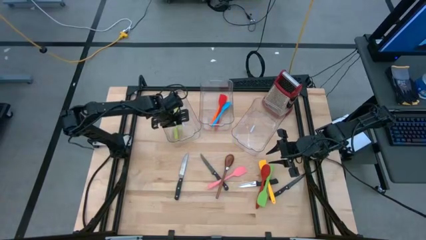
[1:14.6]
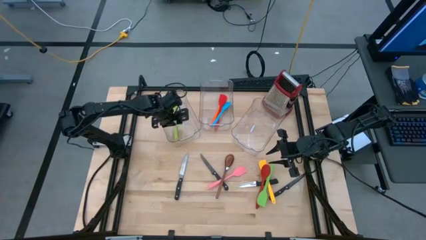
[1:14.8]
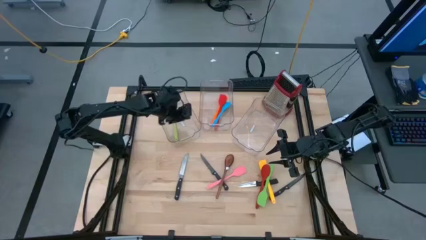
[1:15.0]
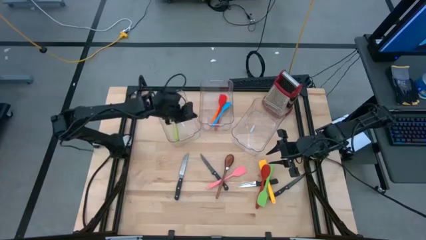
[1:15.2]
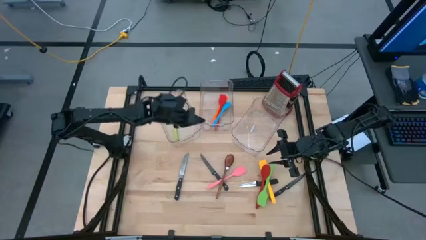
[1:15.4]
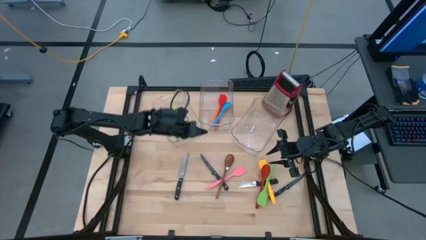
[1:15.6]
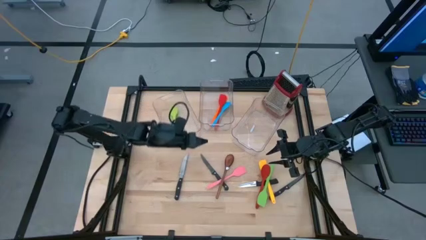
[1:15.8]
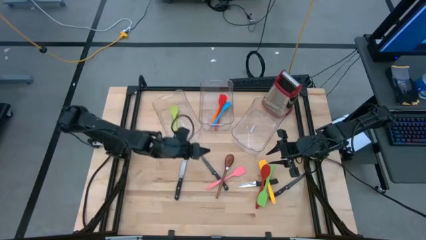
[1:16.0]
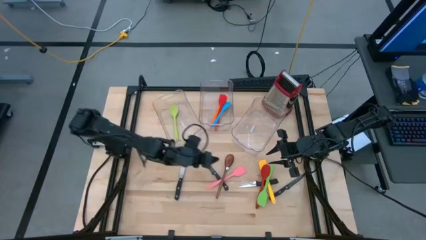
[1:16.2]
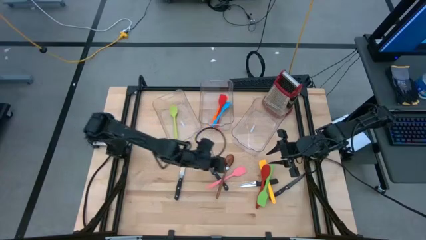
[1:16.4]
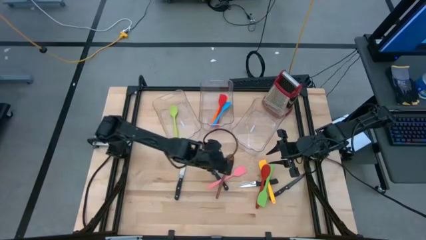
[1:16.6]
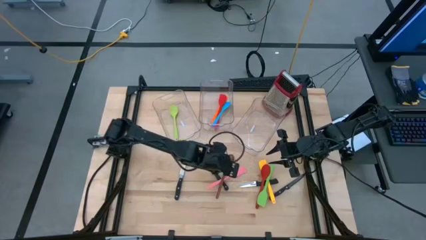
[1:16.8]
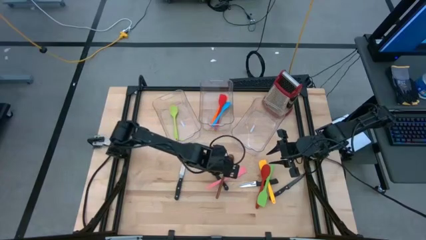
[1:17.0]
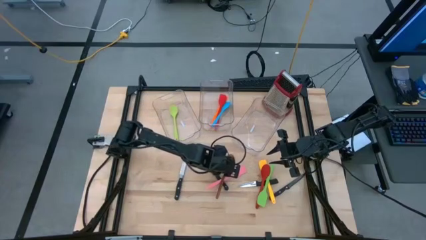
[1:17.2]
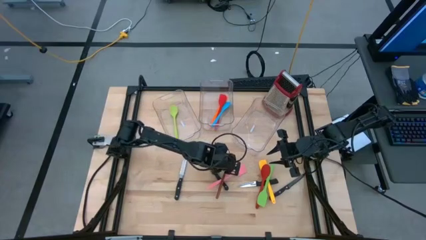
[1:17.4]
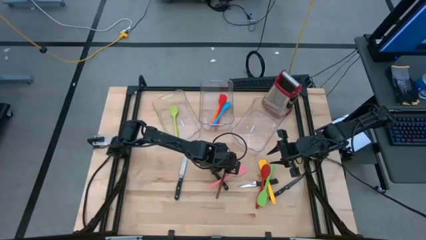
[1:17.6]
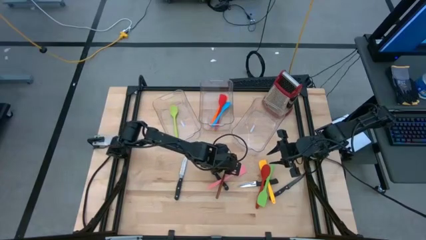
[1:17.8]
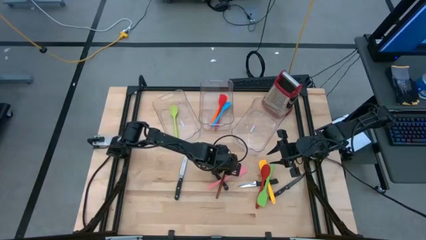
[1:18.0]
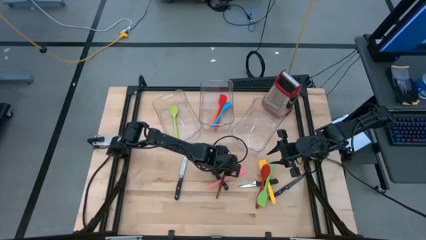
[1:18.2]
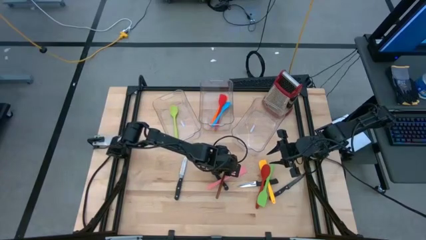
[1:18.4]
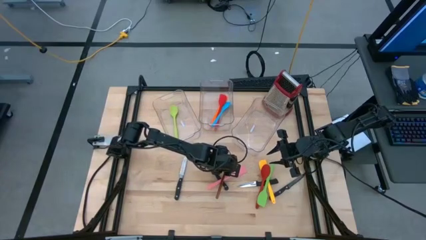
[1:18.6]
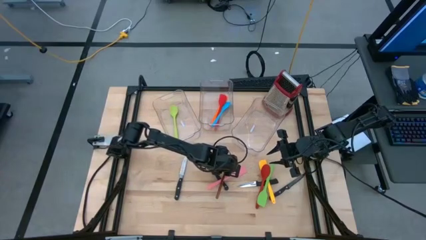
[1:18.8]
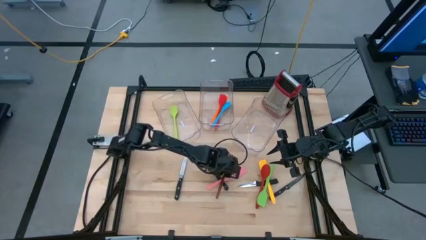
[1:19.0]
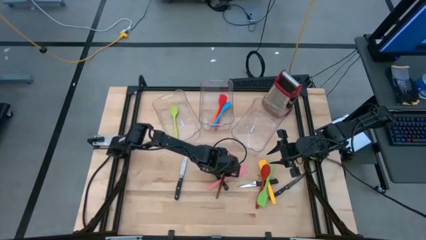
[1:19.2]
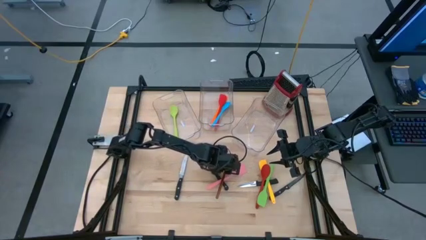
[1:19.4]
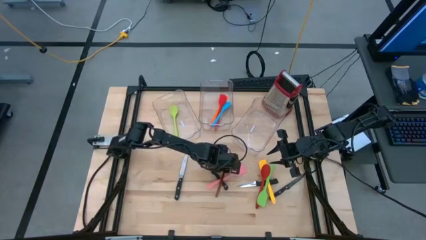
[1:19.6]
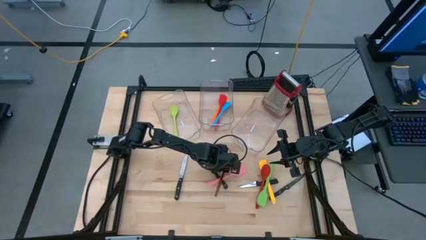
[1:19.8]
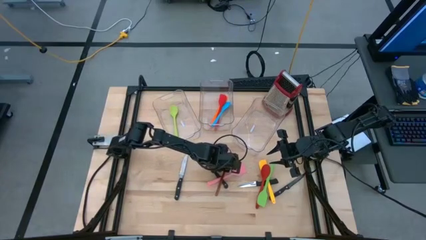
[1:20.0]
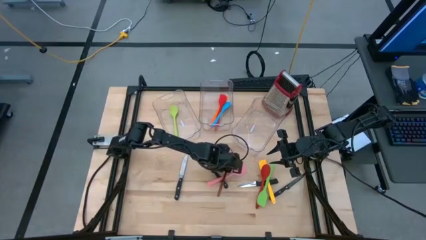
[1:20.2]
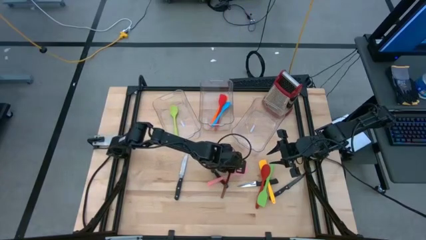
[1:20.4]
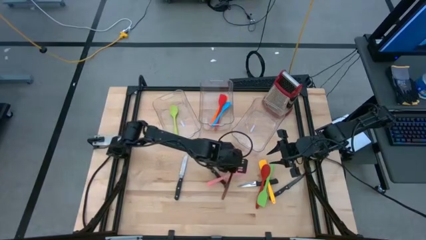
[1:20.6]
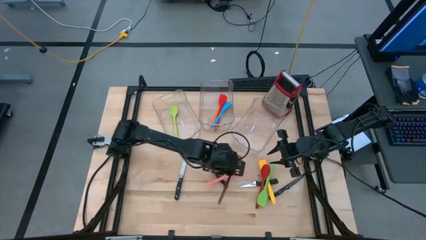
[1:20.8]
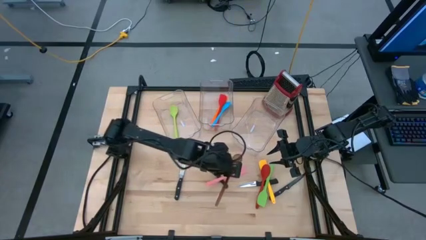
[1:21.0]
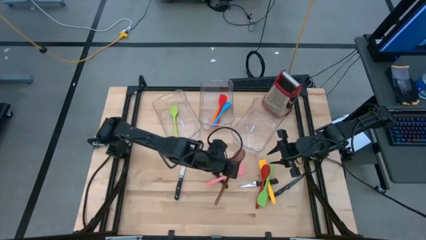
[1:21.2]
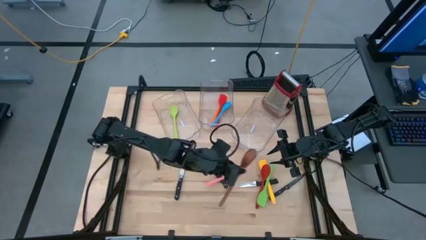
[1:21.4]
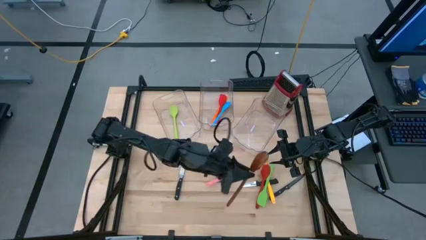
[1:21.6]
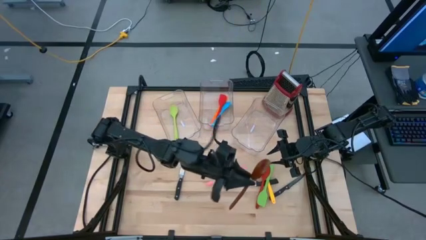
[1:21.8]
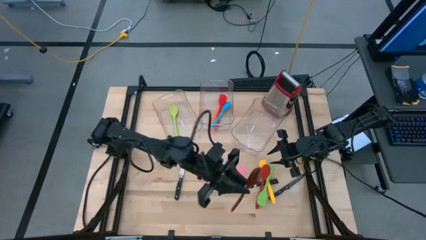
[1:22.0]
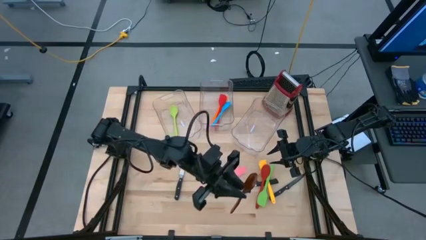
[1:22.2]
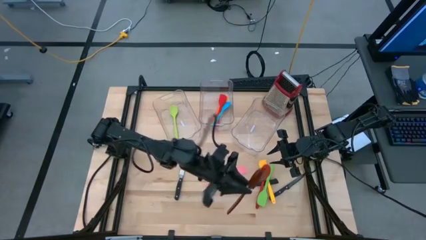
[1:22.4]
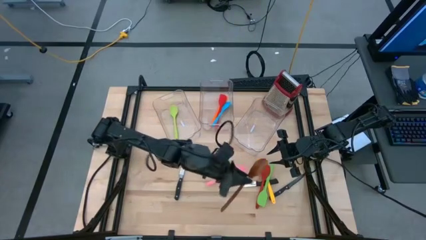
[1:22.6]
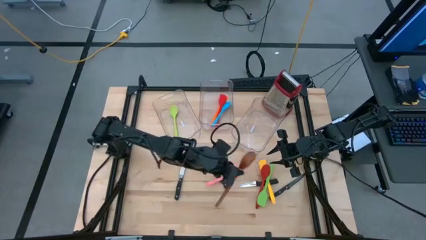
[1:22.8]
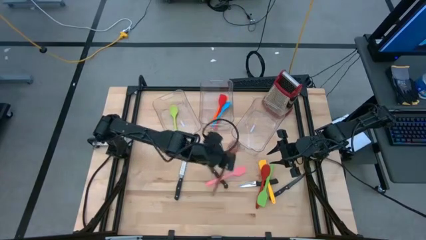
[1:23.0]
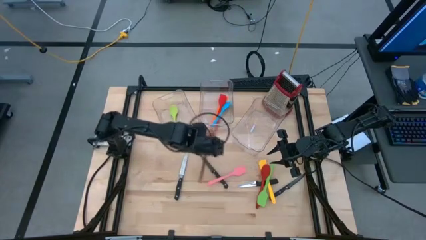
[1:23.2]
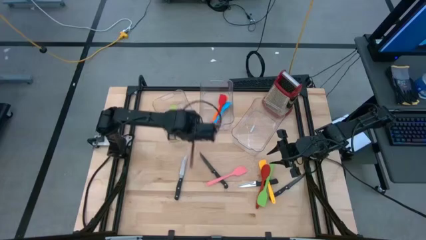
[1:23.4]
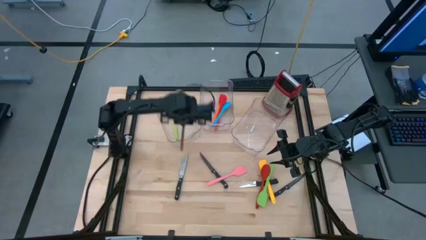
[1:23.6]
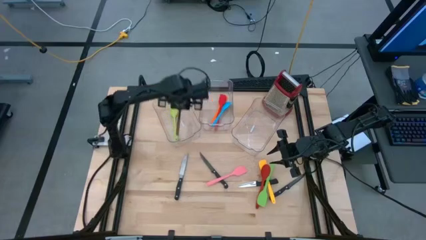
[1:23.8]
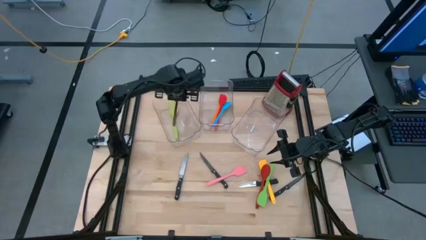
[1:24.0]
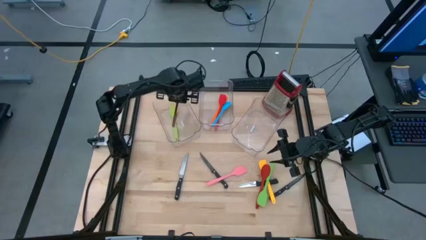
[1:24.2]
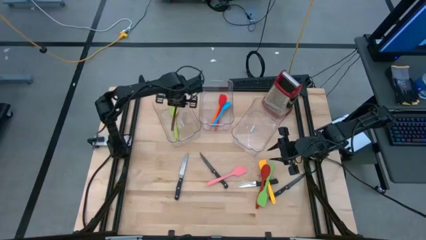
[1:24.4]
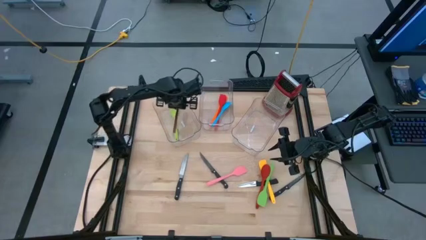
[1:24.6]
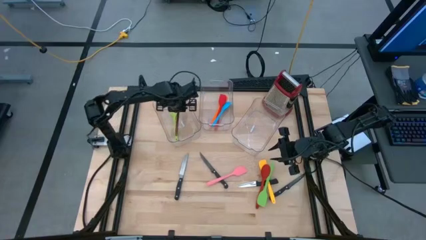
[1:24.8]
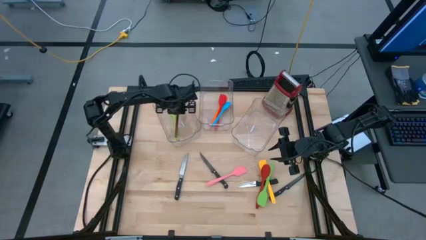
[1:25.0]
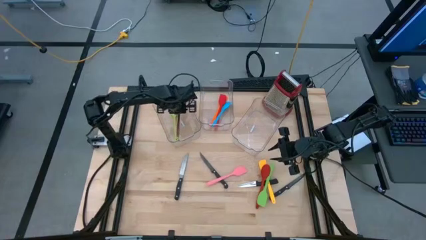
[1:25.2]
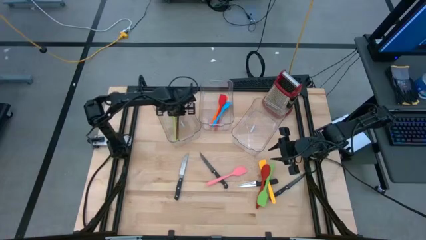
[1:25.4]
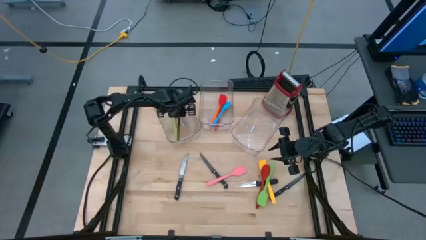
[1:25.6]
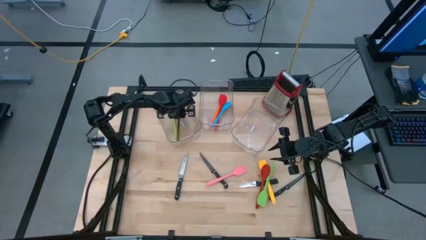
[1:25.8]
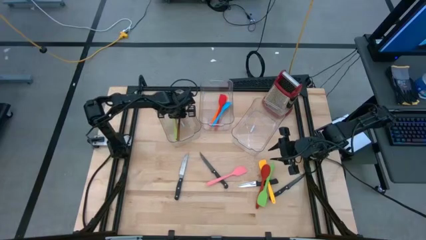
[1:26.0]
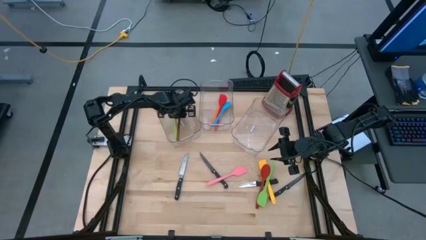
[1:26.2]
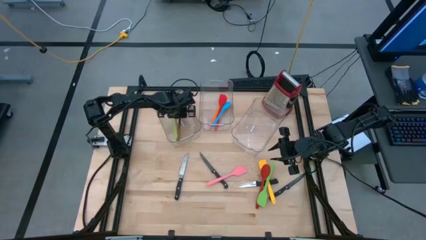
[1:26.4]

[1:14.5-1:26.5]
Task: Pick & Place Kitchen Items
Put the brown serving spoon in the left bin

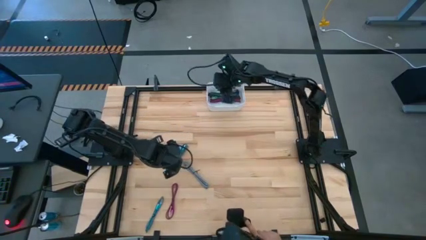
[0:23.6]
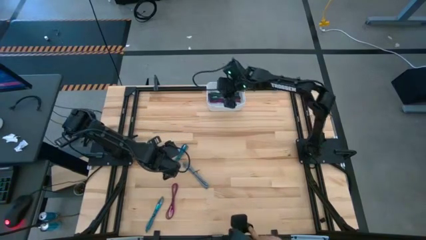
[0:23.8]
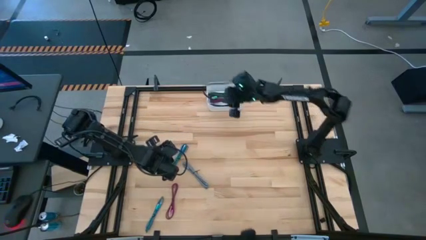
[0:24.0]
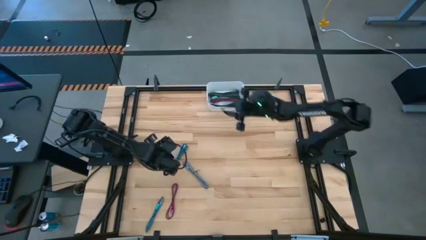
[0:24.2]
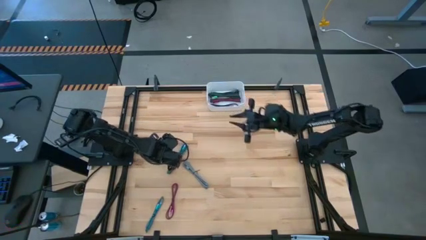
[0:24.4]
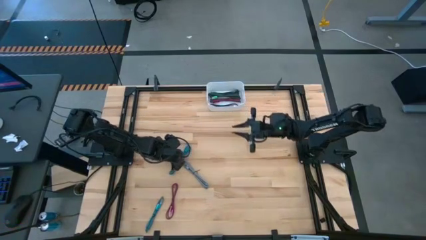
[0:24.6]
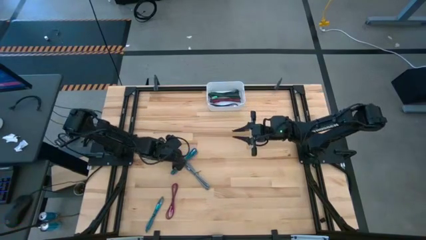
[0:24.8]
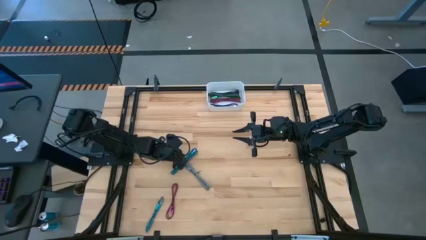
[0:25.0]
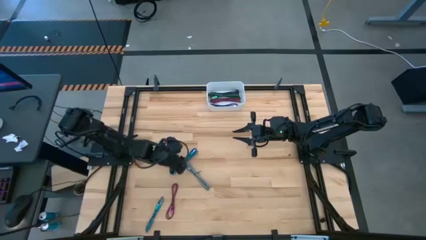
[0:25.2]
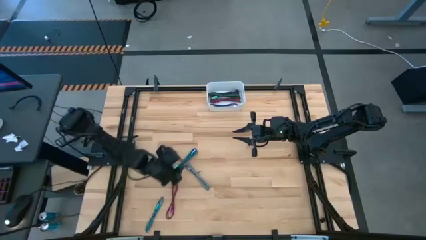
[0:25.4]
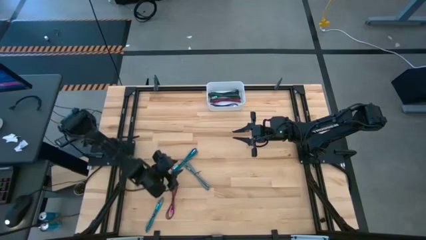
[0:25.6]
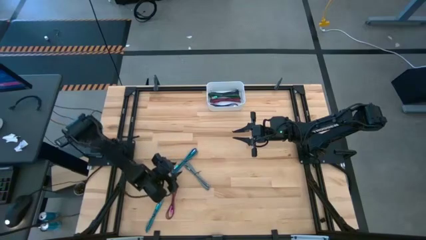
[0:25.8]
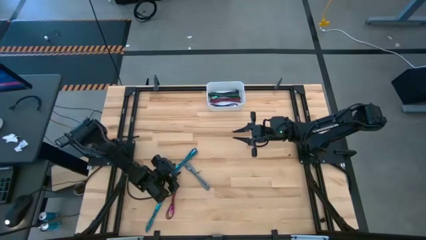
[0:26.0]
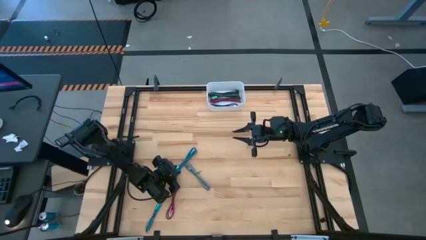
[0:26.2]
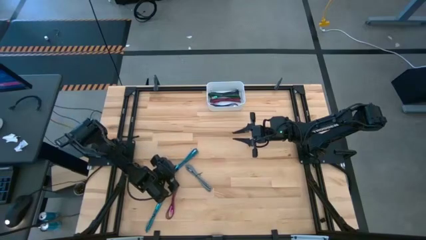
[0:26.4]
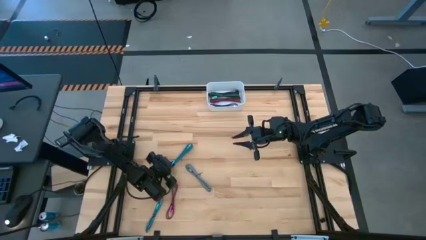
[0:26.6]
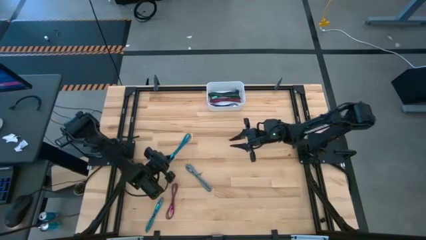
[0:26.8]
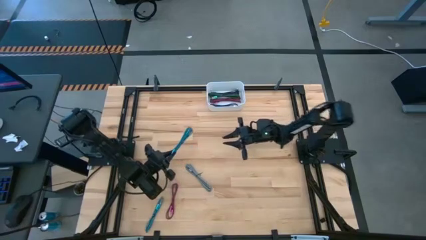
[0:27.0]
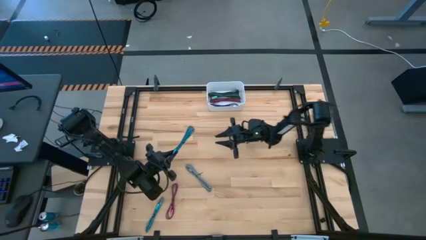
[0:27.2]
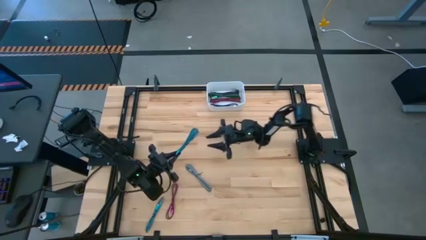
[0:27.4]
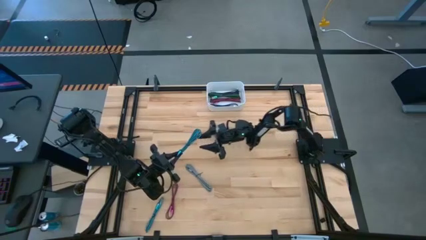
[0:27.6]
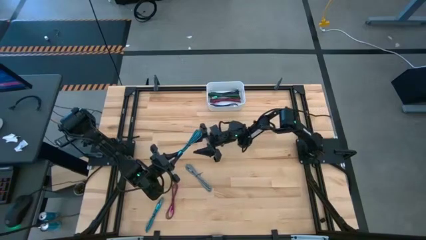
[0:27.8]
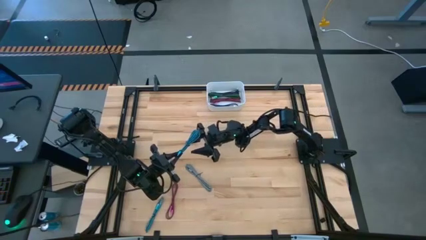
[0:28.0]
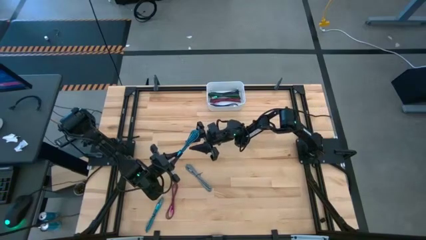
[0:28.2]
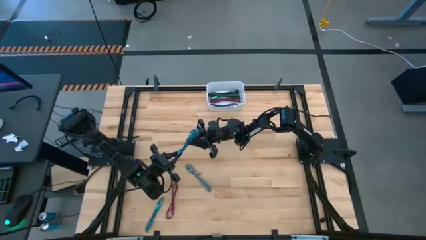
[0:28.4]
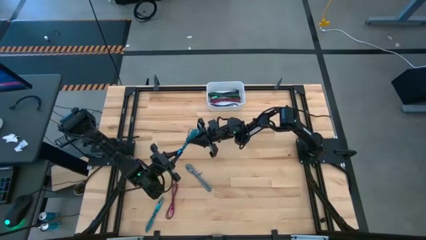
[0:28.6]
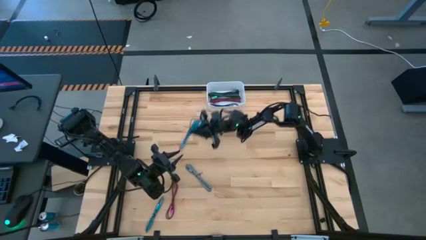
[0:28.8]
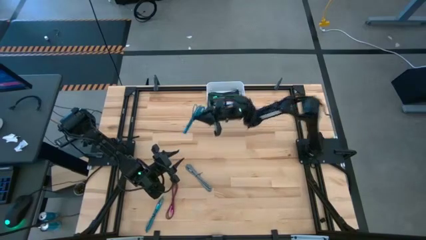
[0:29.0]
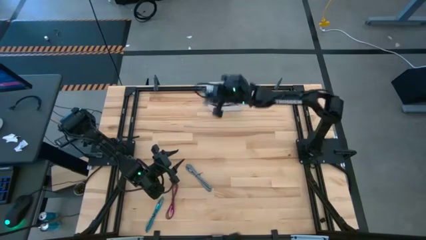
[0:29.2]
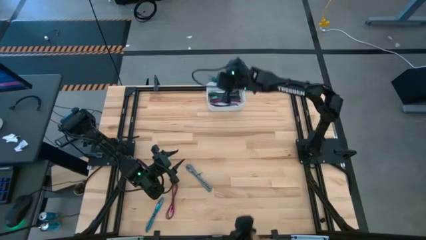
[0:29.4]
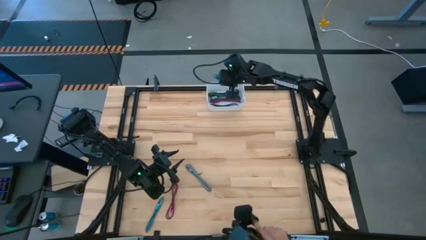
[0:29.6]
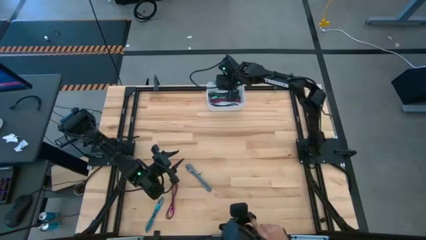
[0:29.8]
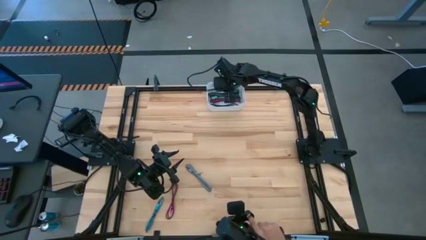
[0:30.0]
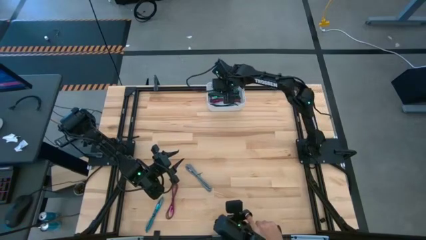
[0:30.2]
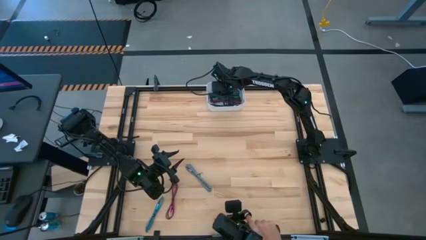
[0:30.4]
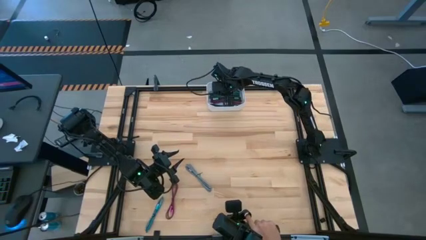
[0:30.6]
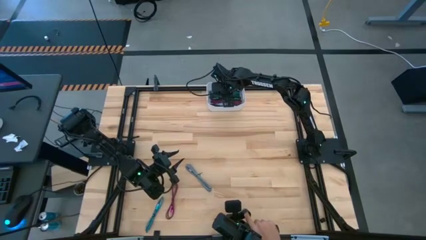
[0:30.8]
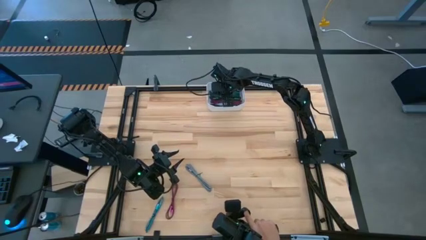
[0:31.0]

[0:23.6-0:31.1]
Task: Pick and place USB-C Cables
Put the top blue charger cable into the white bin
